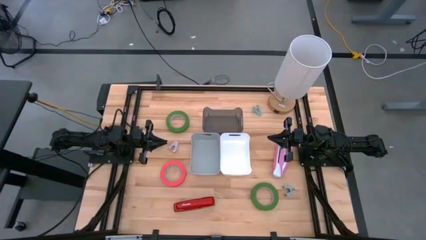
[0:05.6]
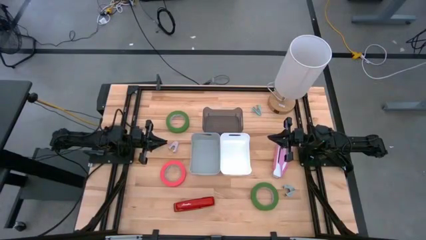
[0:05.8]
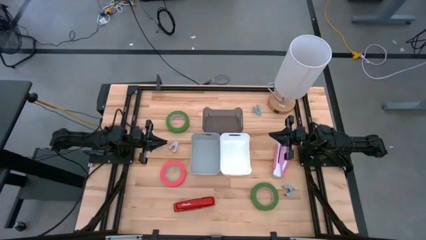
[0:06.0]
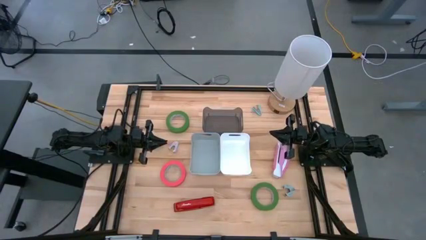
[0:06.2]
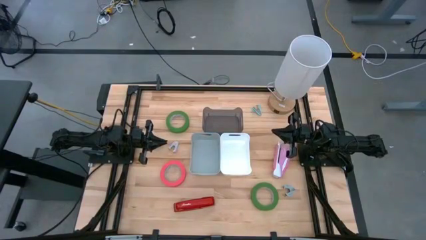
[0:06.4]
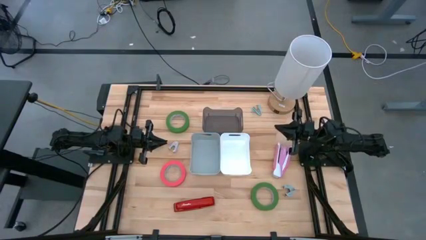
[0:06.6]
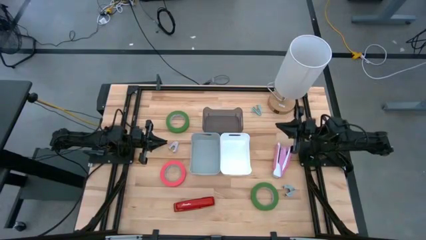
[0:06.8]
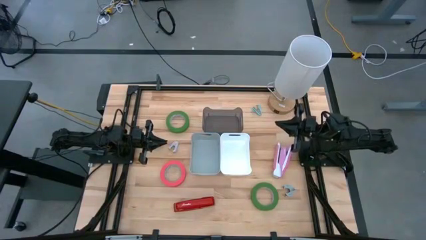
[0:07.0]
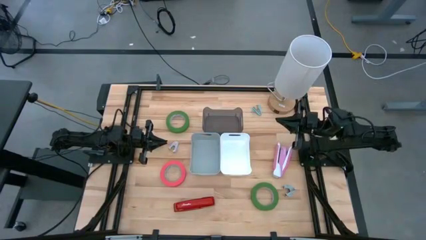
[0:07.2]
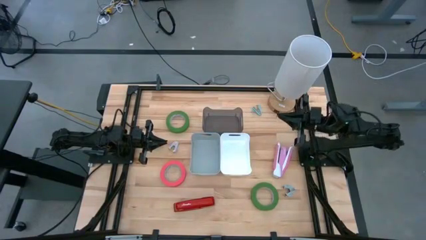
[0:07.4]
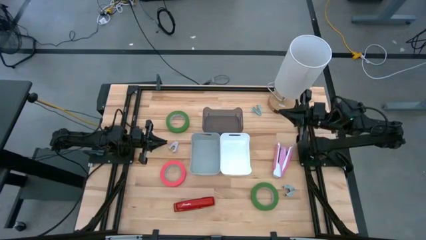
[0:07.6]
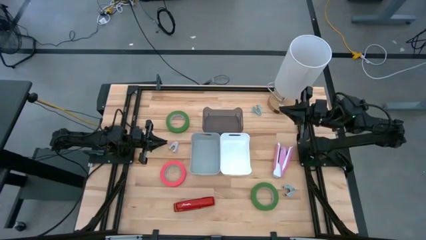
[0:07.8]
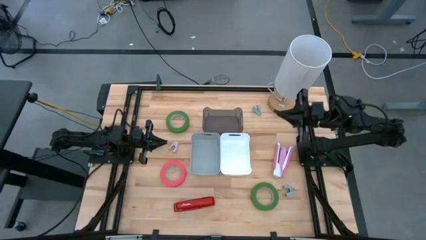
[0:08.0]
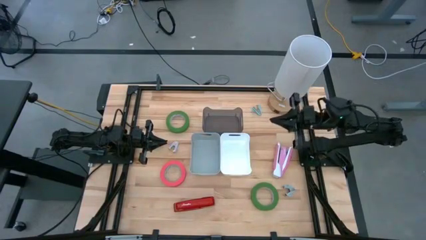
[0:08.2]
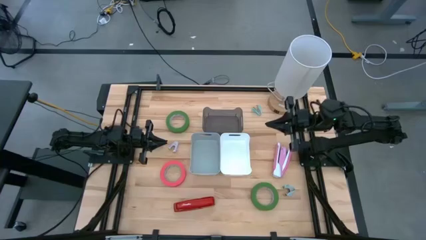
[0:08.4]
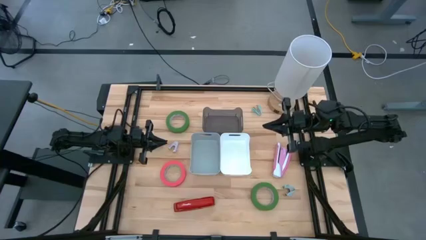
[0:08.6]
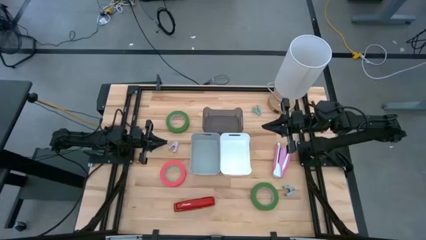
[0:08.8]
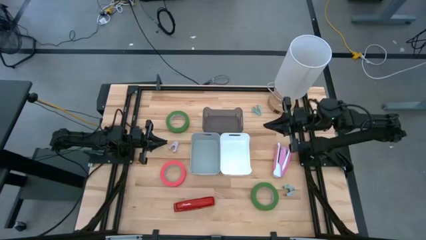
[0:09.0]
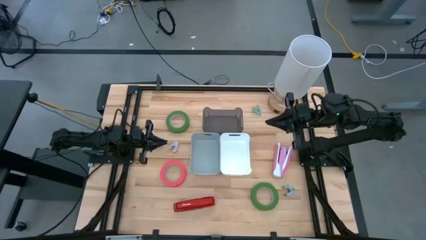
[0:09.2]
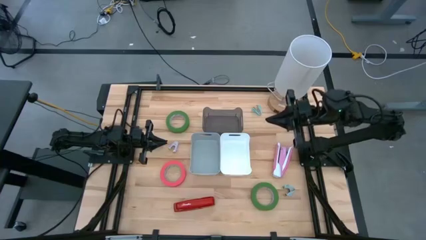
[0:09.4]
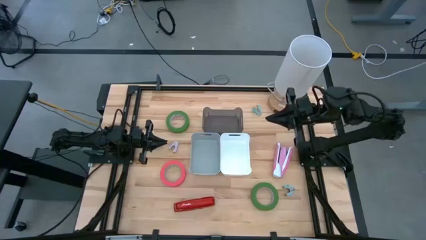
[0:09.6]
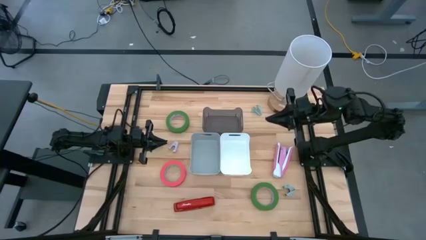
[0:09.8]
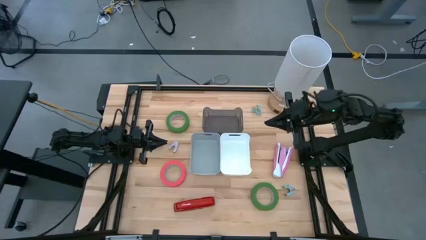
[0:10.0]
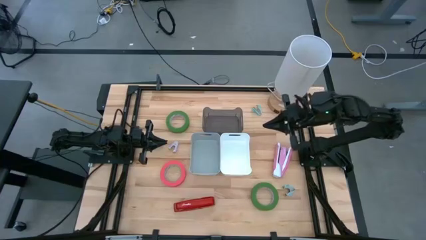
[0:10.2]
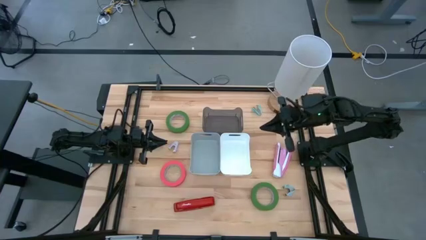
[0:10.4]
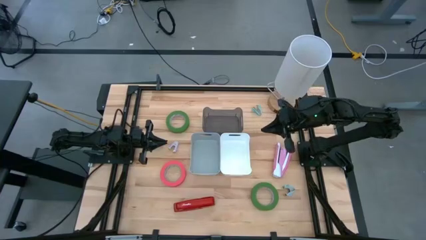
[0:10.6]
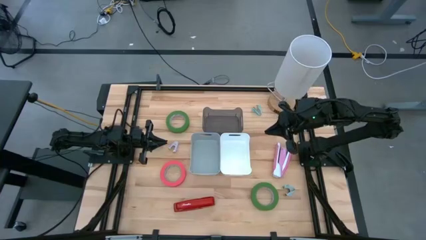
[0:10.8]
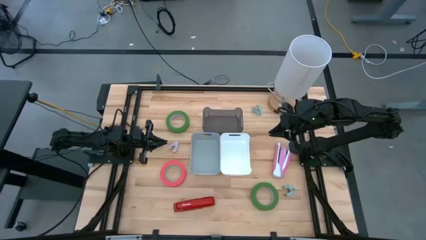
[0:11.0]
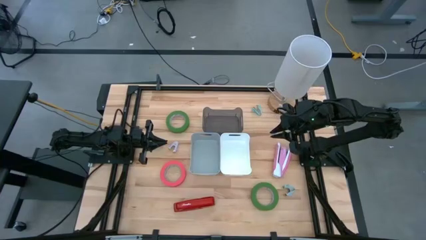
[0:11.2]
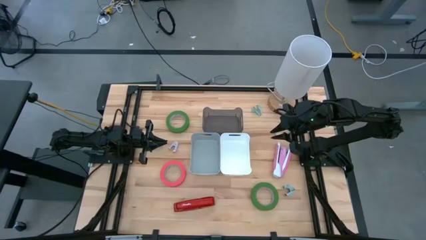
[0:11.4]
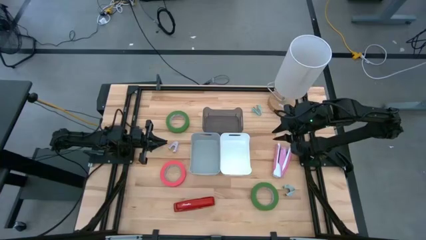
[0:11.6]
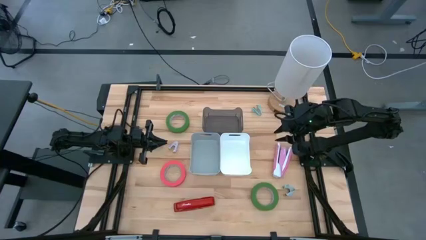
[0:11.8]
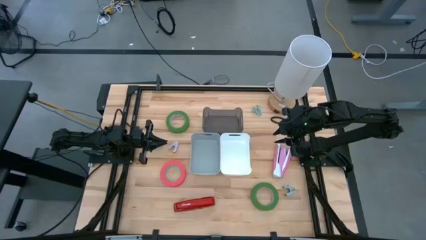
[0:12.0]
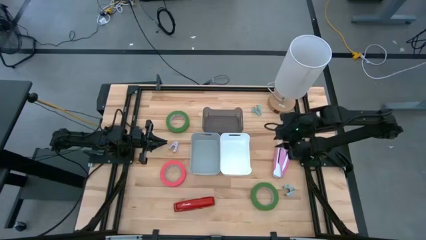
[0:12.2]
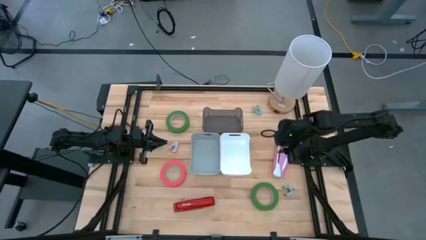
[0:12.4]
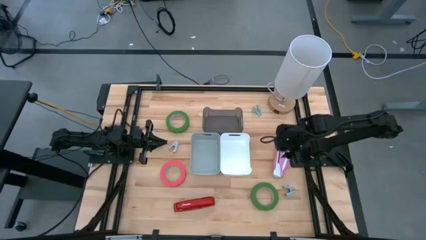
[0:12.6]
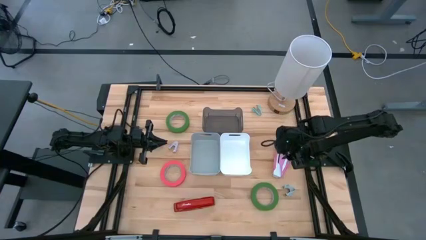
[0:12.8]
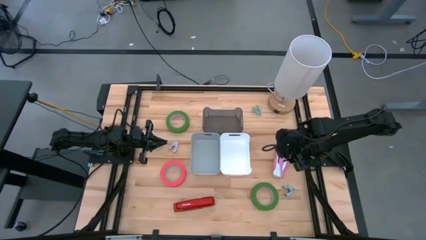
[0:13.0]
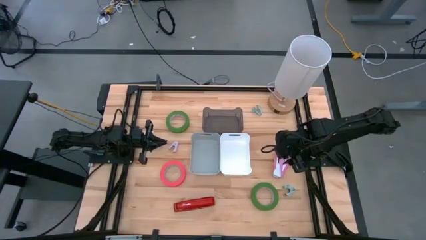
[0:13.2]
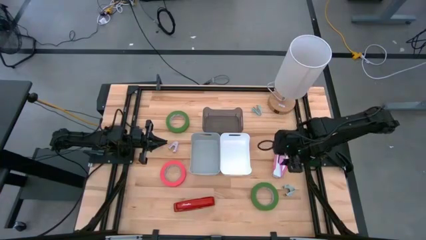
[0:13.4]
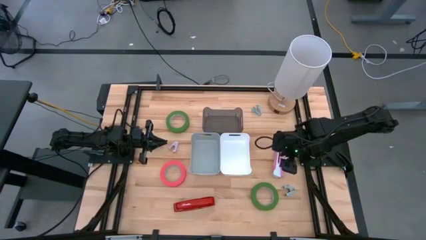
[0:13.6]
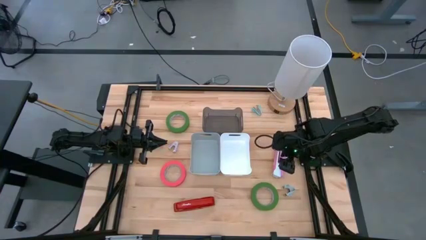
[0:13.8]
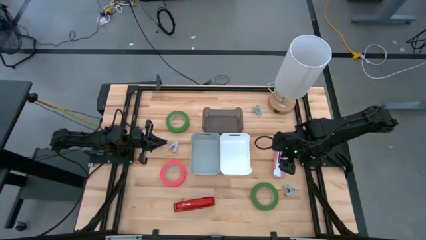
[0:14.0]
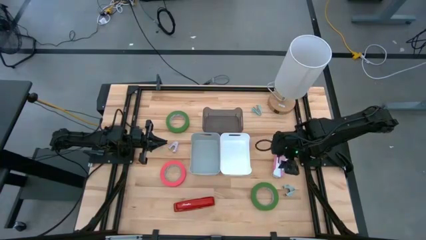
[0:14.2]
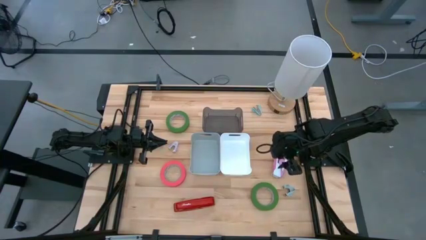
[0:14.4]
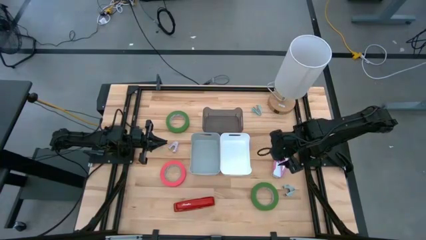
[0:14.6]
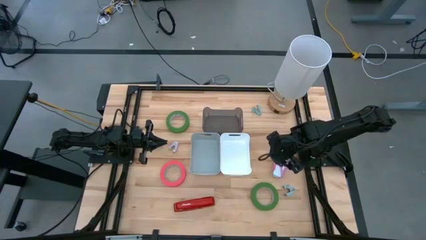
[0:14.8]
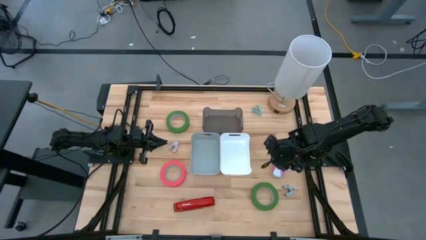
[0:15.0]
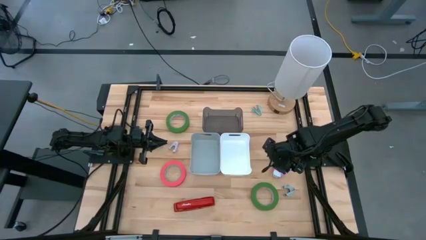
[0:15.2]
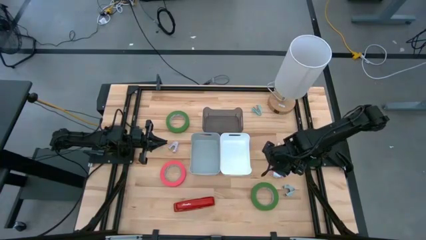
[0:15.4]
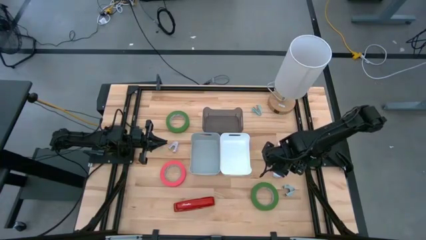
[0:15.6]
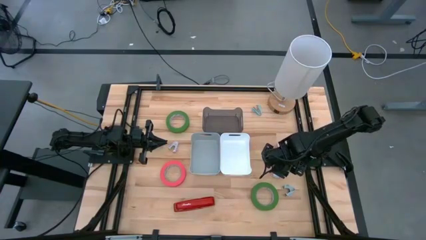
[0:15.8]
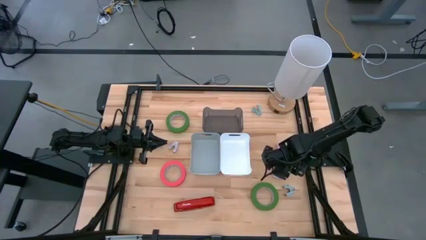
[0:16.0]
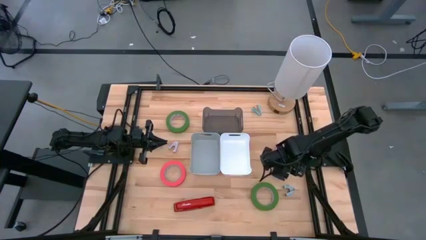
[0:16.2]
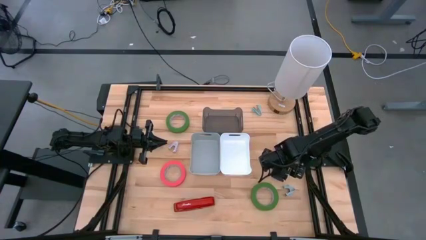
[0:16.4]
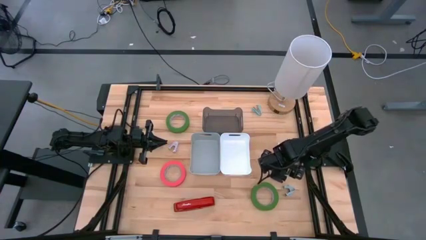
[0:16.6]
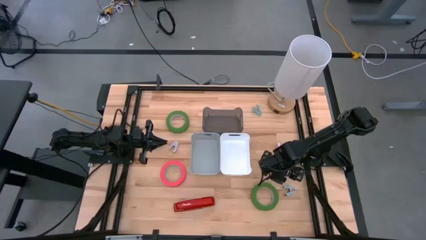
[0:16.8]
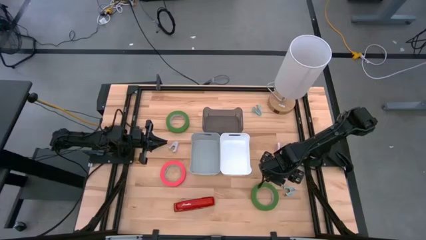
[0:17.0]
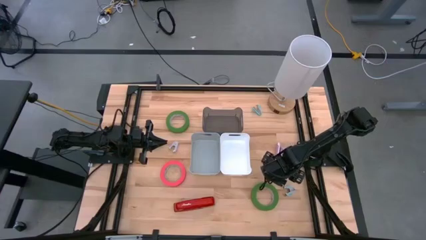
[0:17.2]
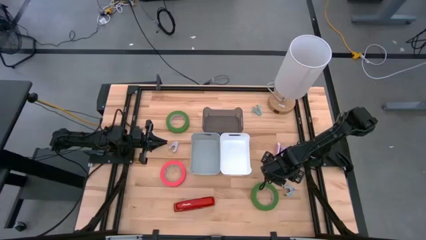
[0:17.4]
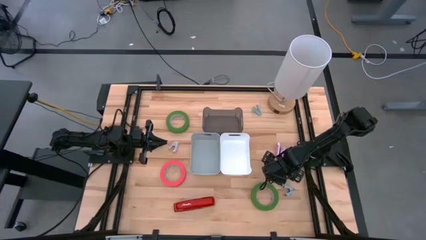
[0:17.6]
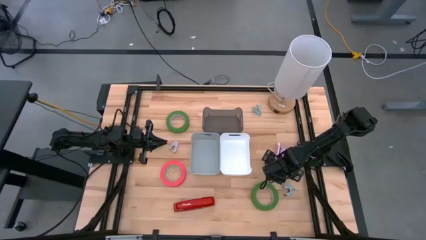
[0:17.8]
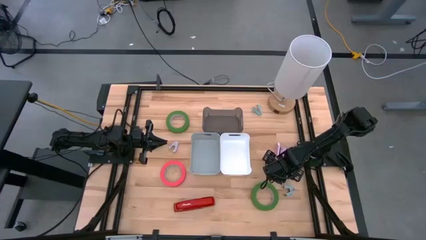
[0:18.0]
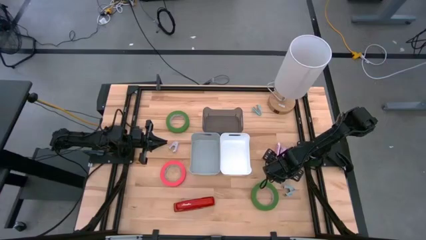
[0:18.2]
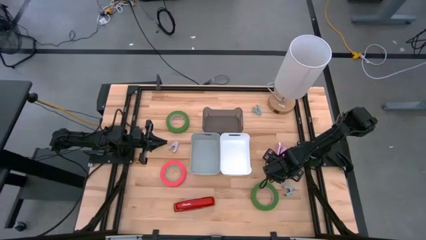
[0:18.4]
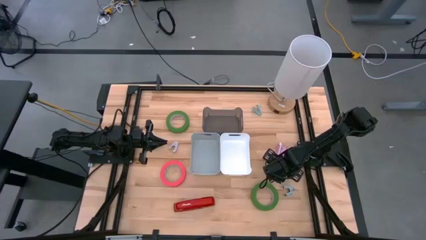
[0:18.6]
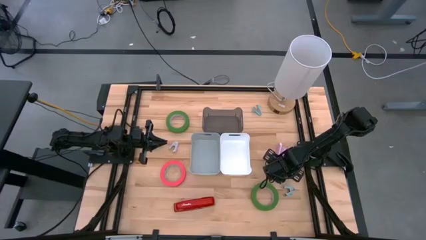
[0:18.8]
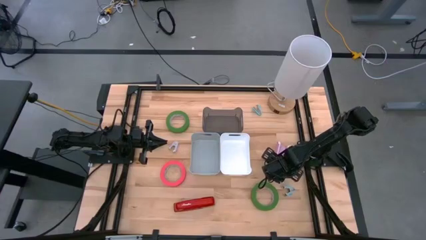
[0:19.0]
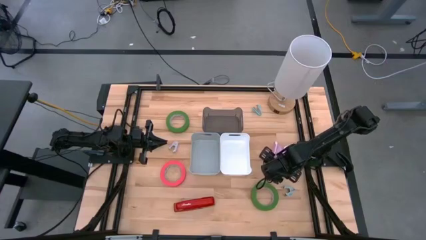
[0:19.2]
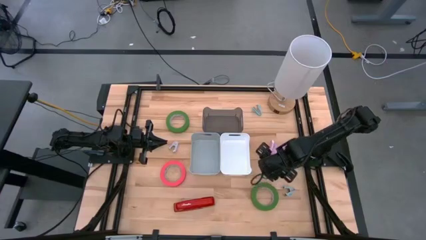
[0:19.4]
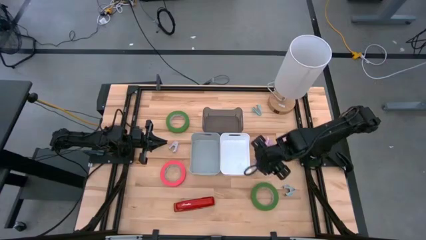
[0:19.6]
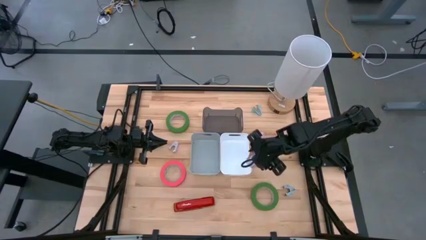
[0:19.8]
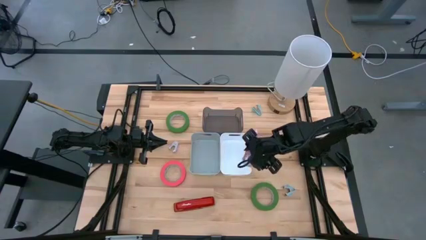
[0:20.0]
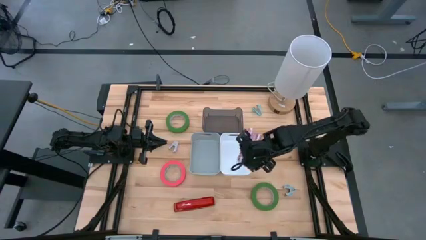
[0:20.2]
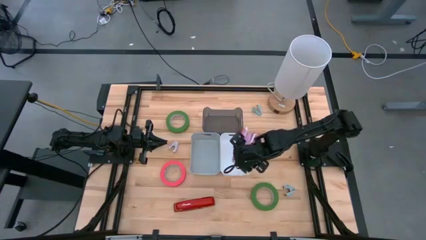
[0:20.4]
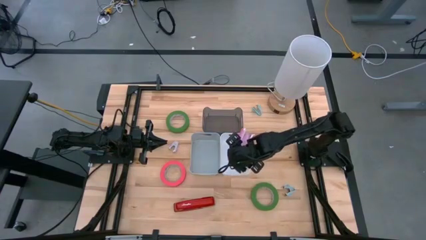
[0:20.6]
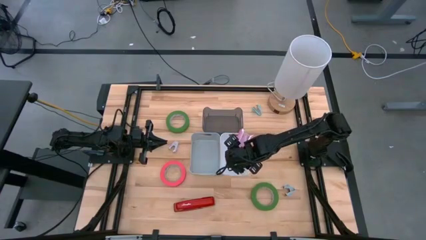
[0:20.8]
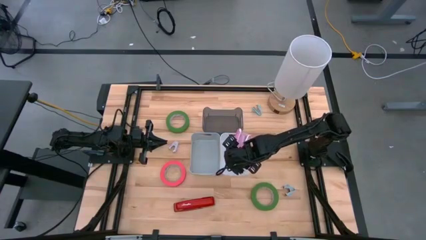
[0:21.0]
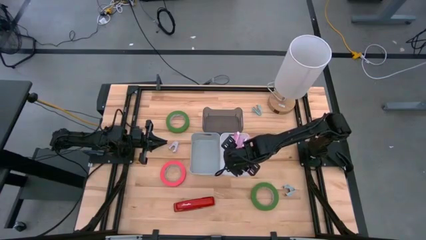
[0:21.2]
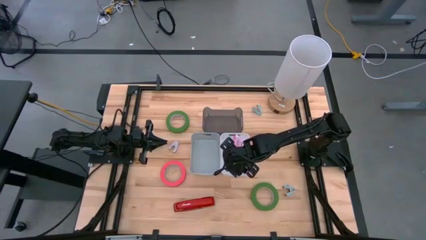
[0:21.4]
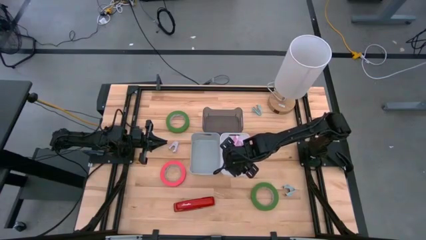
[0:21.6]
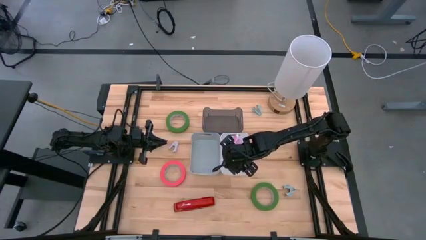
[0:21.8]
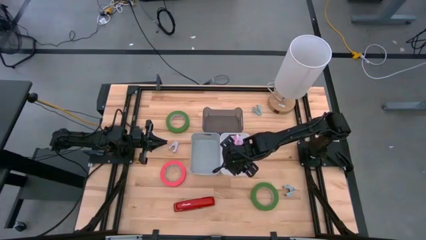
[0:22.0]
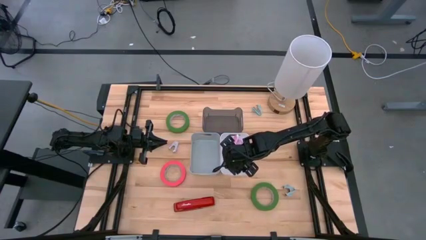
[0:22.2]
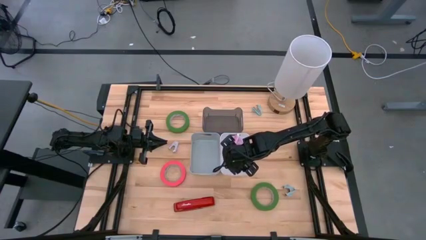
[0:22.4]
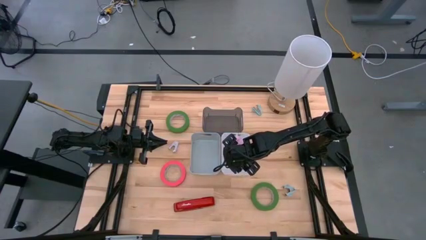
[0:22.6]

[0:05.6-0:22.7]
Task: Pick and place Stapler, Stapler remover, tape
Put the pink stapler in the white bin
